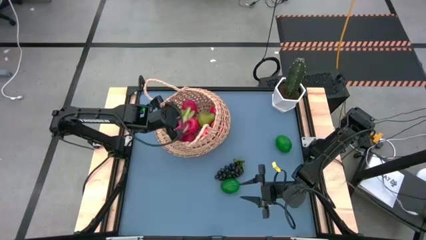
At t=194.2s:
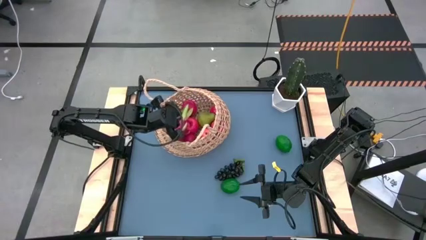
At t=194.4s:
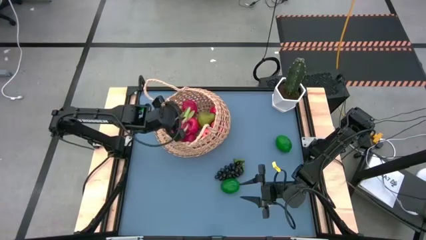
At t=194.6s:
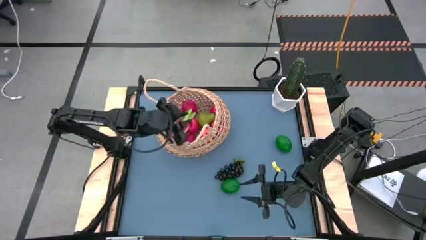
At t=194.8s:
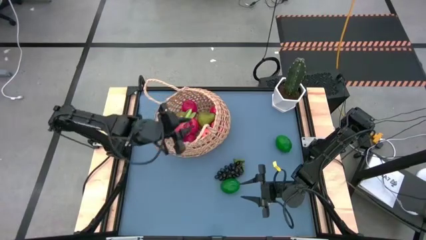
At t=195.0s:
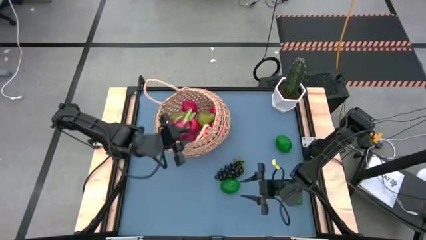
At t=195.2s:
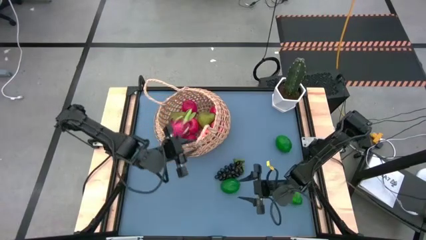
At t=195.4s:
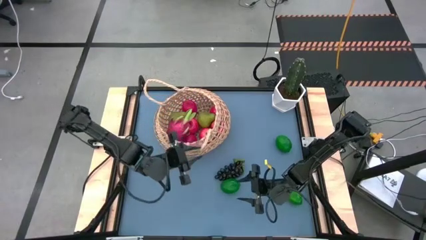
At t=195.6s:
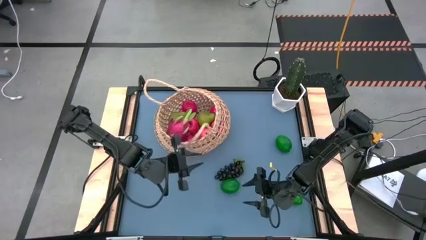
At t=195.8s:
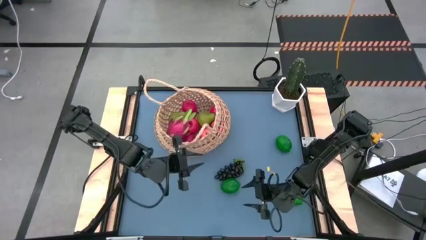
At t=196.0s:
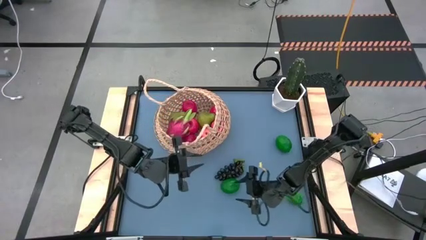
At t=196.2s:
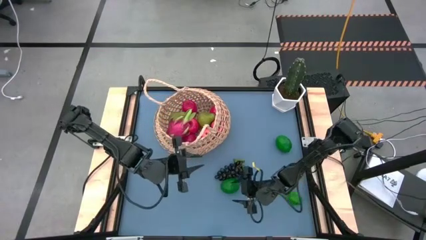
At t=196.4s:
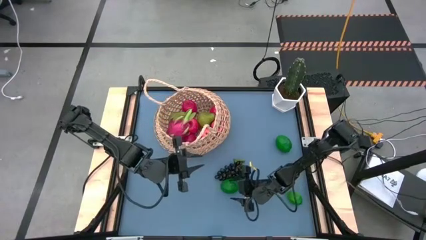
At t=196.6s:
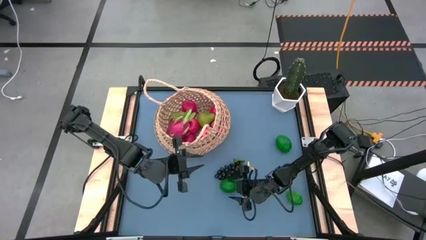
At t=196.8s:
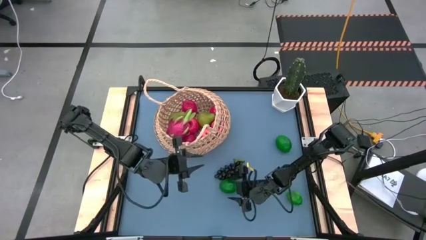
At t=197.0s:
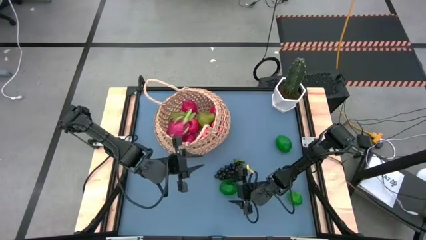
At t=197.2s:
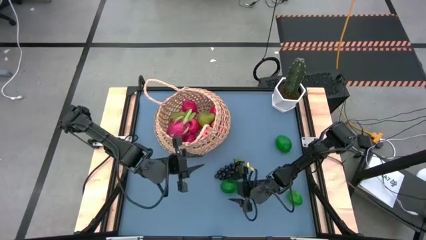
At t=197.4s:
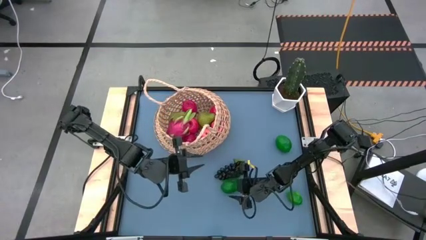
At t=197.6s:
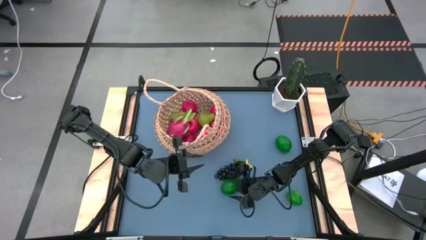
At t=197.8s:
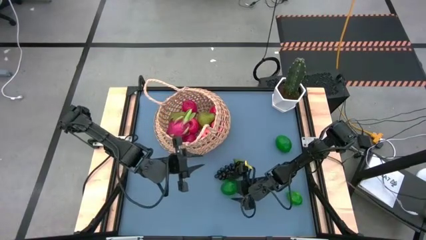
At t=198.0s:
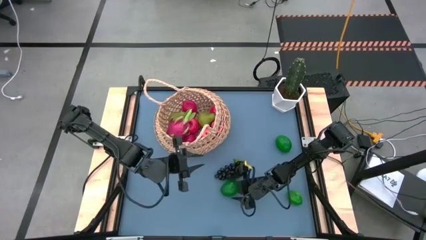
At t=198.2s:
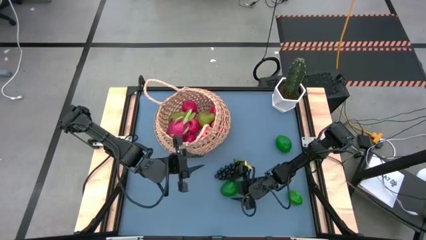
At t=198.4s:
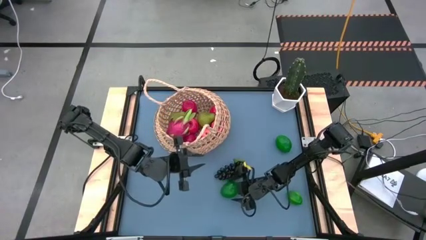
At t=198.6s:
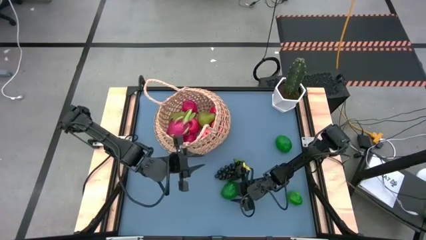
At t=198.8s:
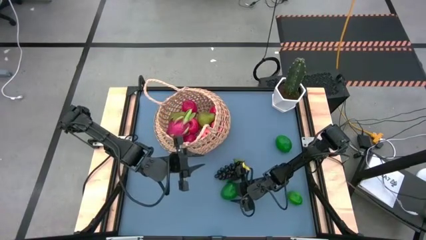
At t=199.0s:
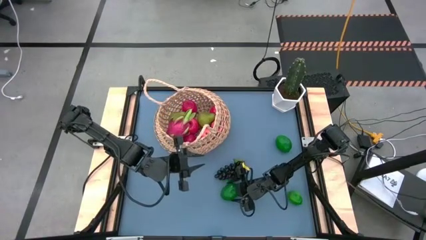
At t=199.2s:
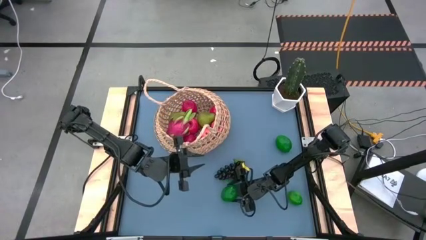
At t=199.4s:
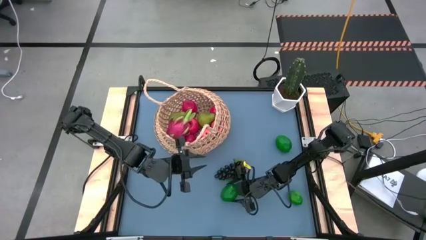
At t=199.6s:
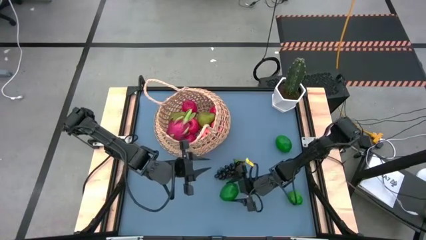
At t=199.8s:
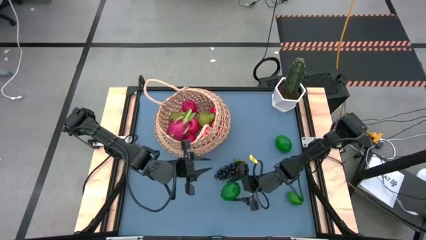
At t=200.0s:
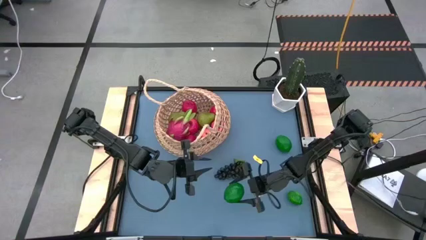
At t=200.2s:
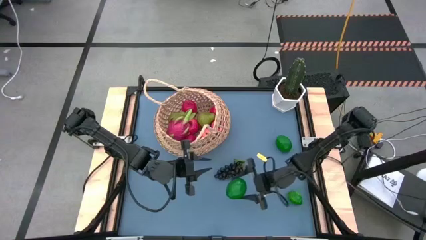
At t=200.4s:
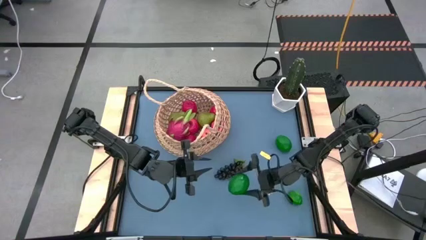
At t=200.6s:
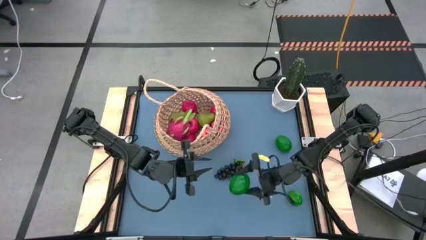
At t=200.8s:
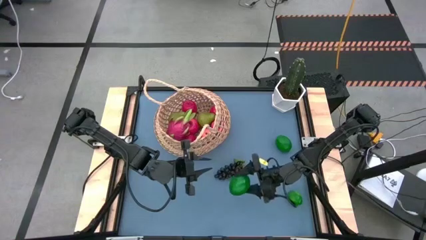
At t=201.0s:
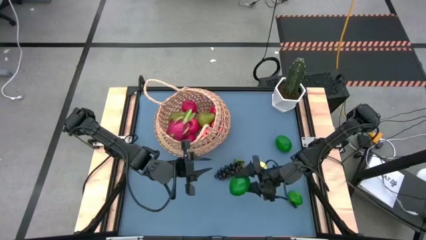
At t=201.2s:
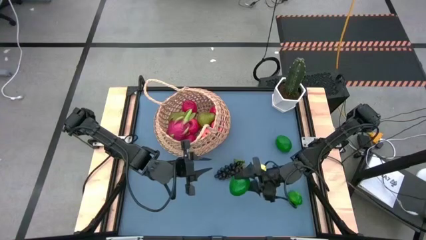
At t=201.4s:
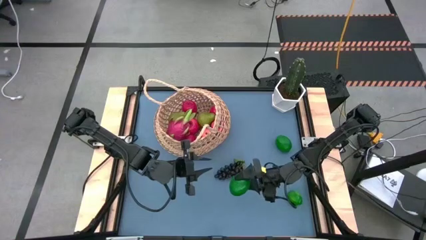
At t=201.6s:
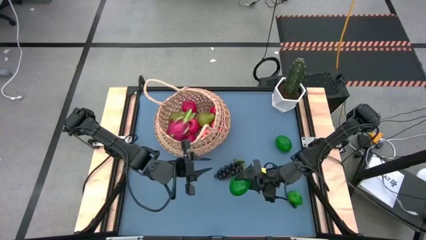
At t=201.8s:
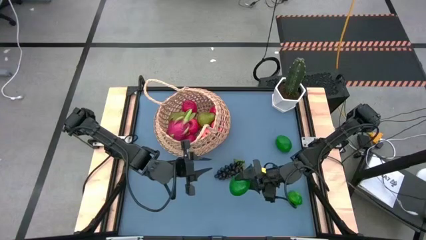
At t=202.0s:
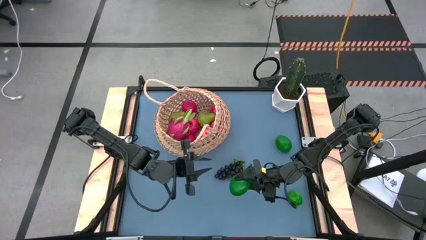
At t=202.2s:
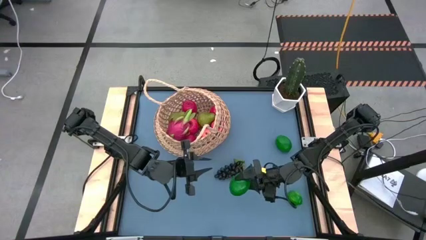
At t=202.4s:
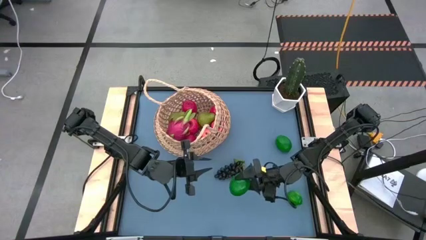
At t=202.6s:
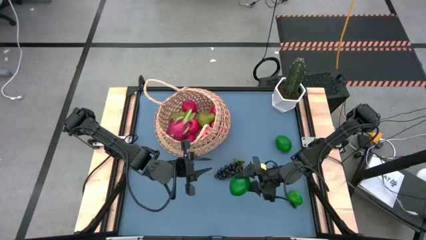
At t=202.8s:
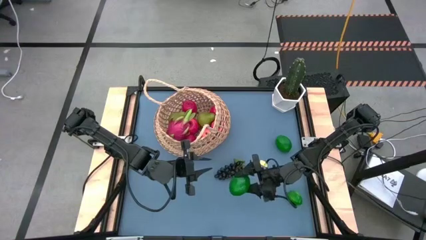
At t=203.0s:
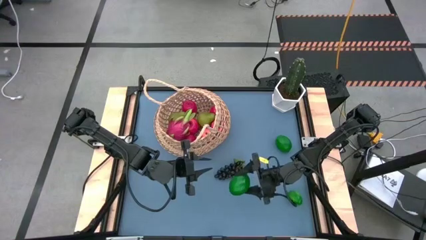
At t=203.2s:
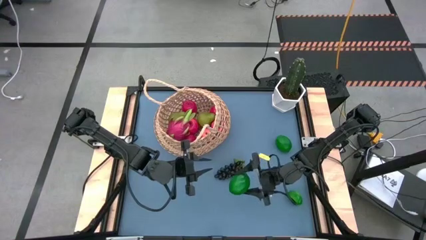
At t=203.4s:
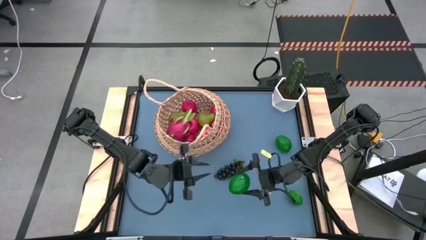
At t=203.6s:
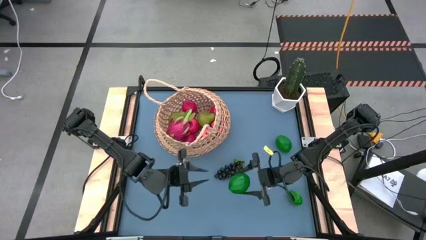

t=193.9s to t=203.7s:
Task: Build produce basket
Put the green lime into the basket

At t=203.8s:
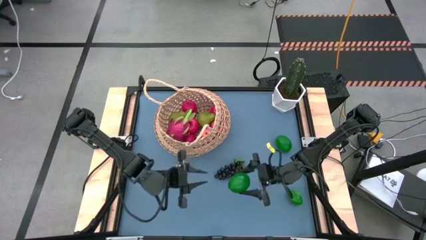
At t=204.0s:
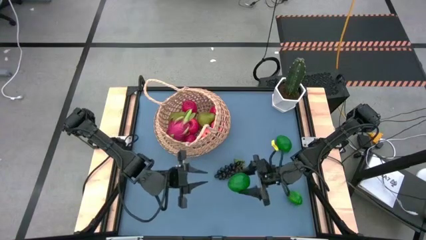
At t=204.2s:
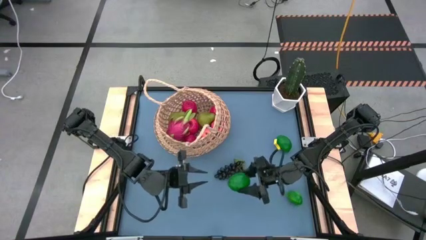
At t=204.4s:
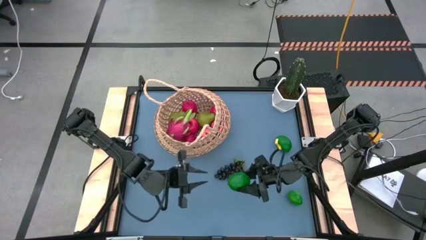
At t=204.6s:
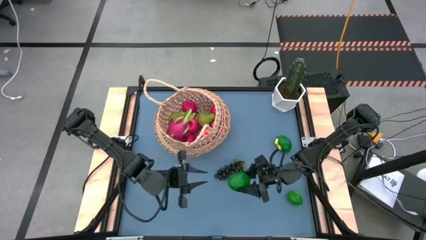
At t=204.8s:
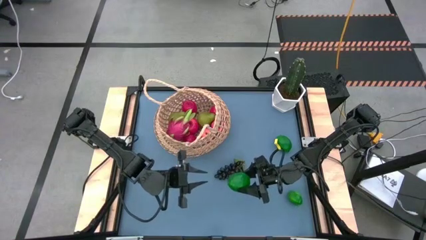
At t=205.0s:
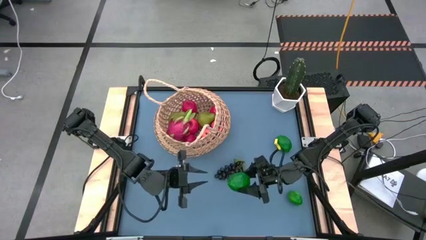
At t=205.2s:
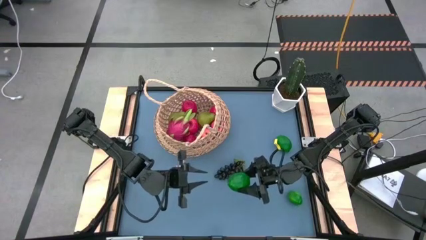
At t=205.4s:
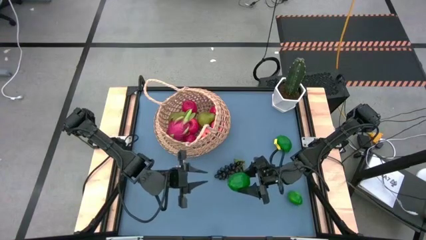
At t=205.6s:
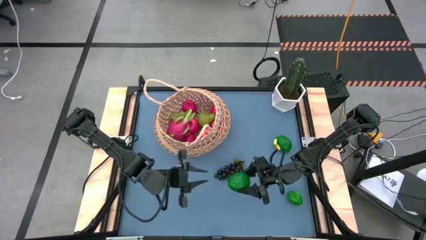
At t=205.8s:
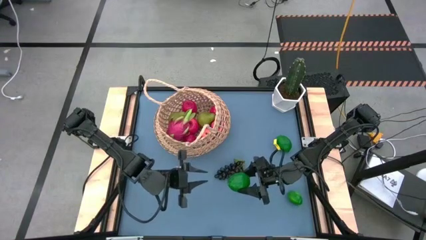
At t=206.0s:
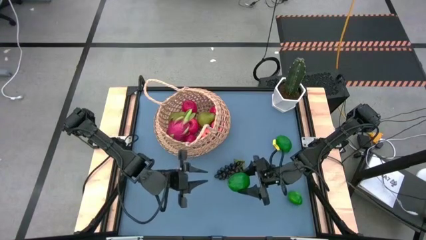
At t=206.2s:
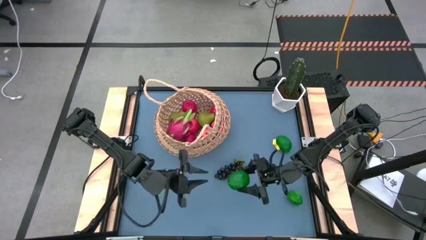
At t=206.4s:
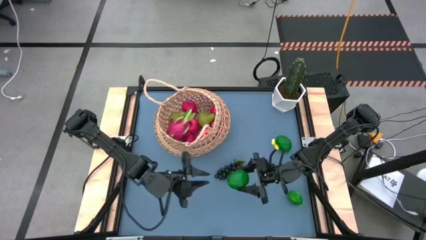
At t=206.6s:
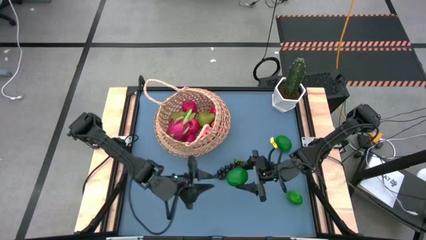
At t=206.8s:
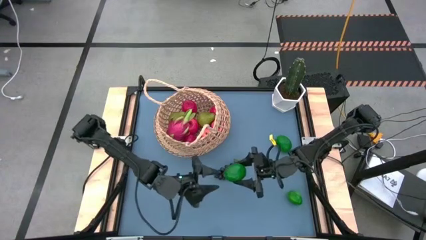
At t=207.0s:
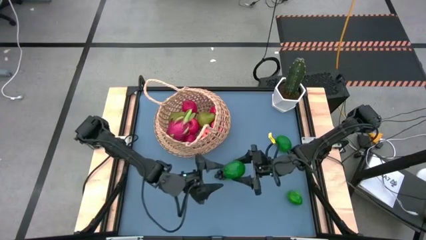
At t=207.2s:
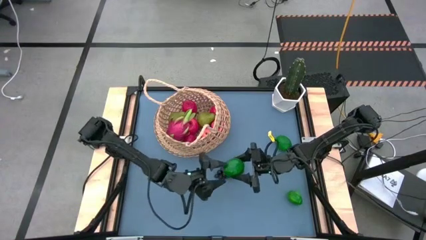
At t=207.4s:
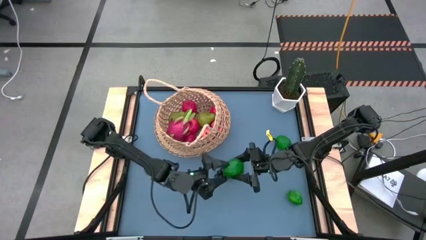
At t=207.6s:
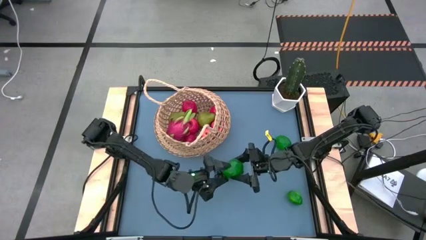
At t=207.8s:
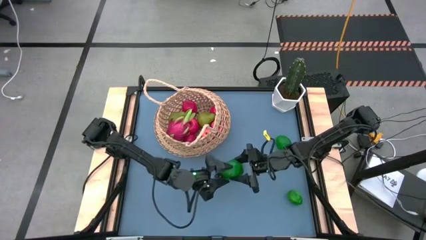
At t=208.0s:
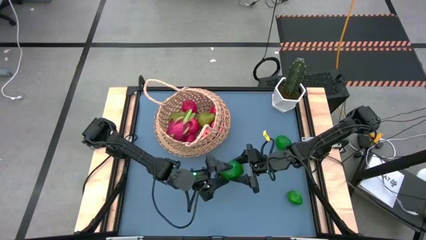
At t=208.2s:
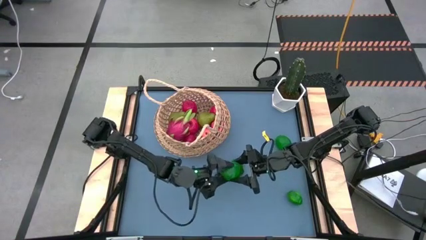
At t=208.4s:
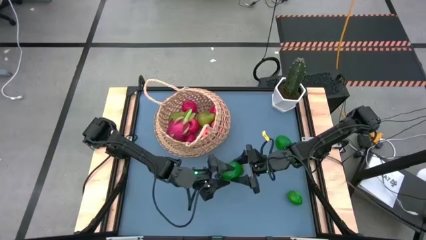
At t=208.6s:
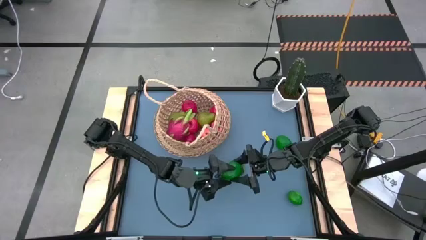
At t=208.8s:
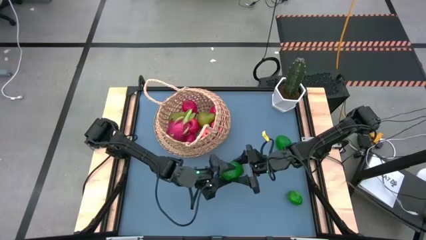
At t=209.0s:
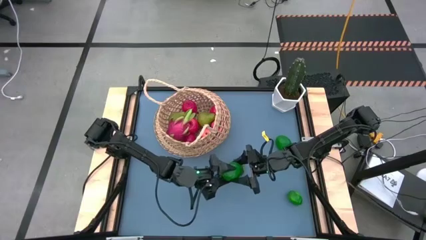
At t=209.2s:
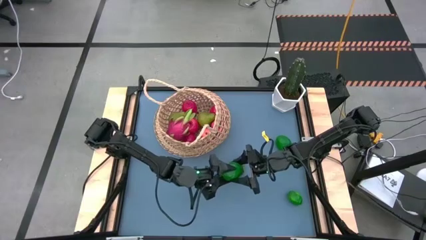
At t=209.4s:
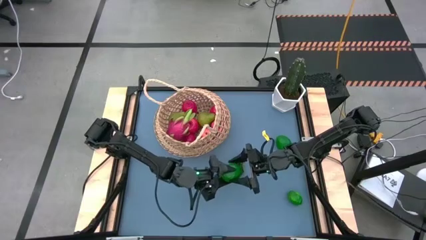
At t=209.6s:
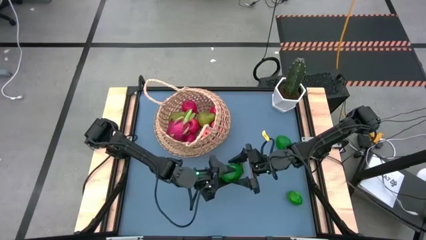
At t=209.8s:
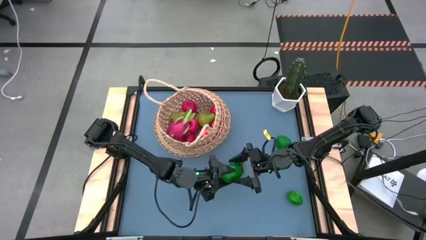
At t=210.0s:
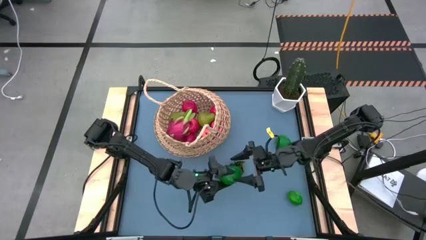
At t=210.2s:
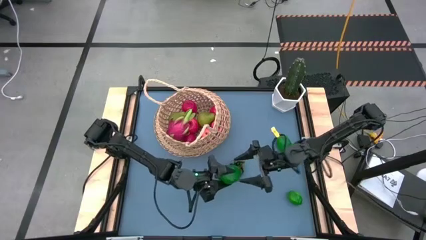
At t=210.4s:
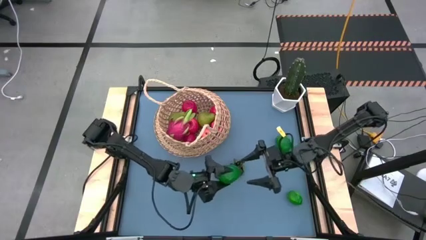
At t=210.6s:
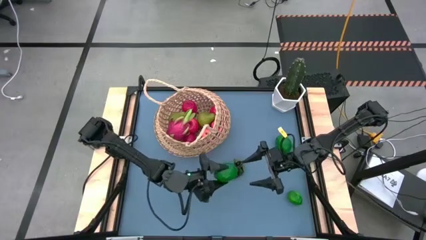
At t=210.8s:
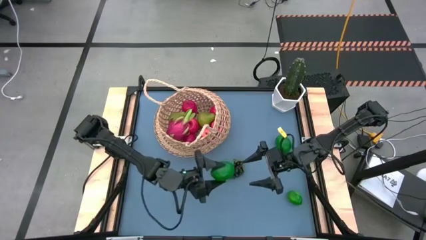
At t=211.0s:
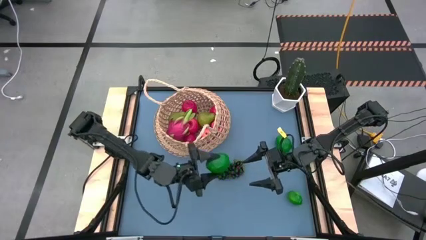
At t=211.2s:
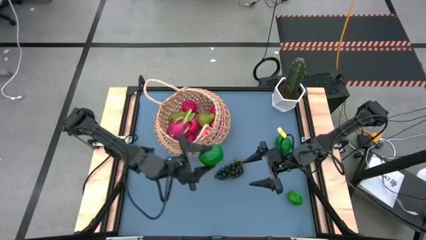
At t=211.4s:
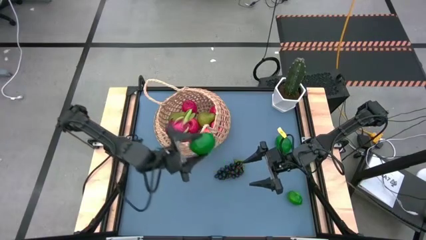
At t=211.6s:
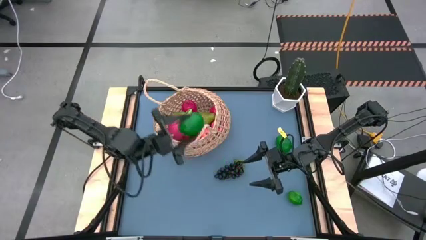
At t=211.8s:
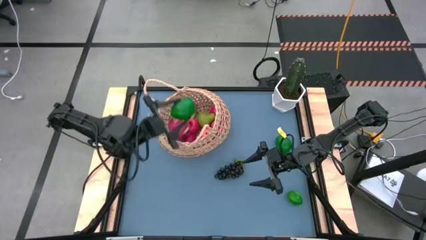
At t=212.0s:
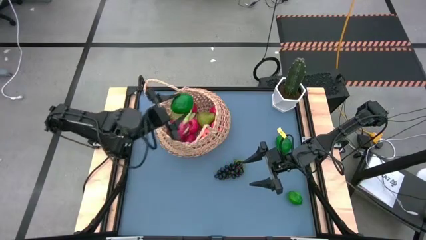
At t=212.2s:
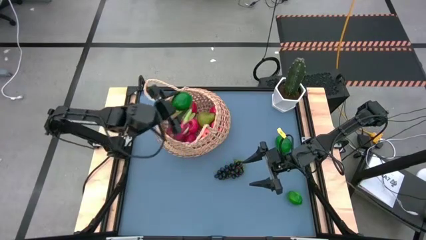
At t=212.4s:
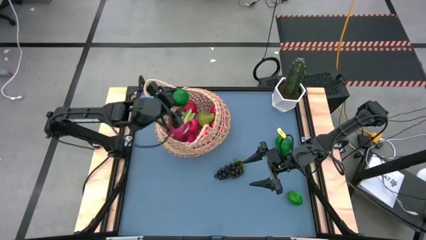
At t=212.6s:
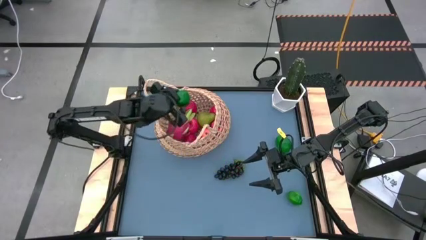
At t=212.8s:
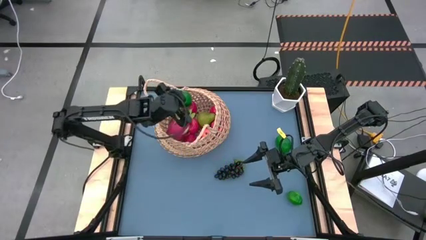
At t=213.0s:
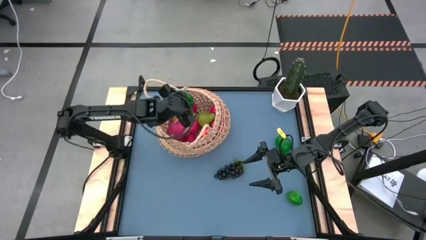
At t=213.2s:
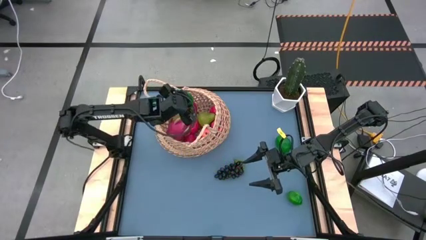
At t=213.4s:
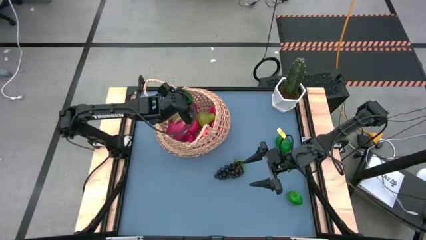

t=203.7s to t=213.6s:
Put the green lime into the basket
